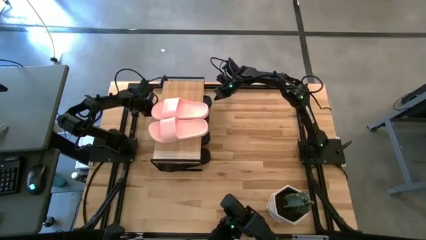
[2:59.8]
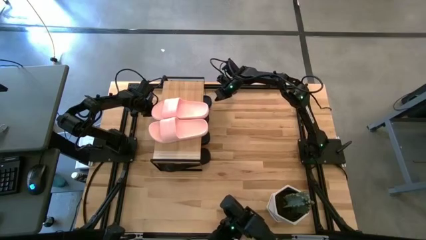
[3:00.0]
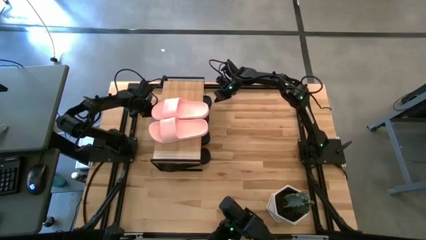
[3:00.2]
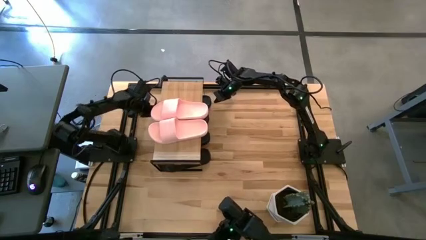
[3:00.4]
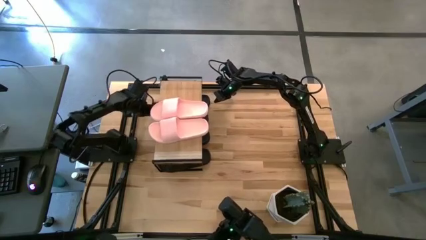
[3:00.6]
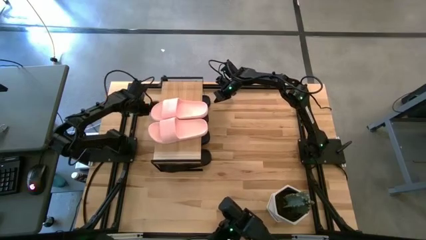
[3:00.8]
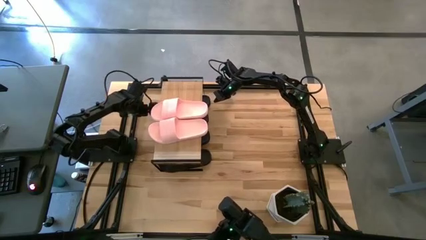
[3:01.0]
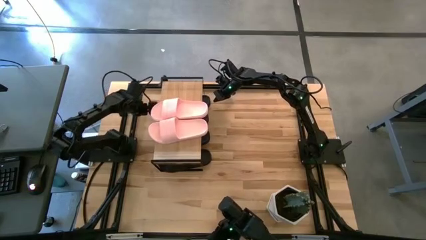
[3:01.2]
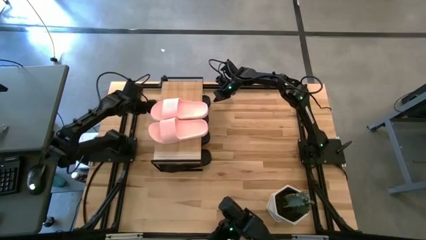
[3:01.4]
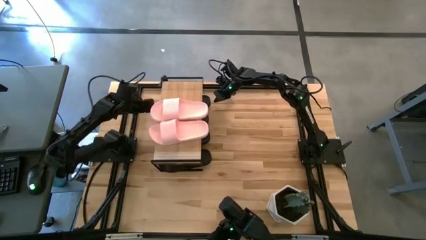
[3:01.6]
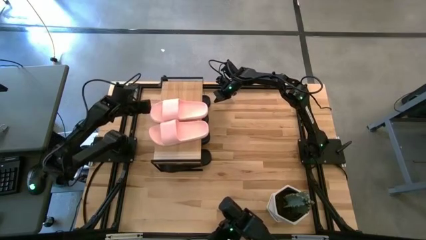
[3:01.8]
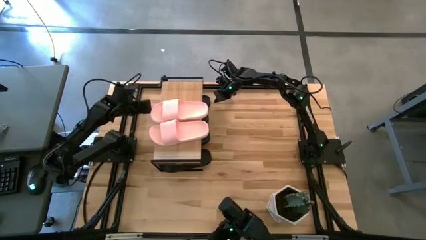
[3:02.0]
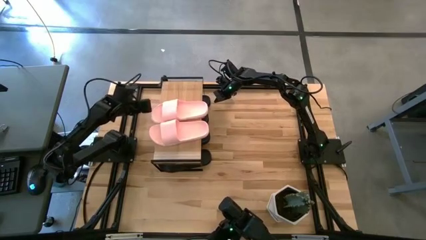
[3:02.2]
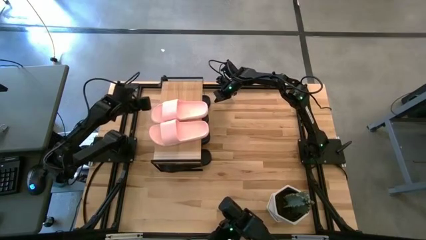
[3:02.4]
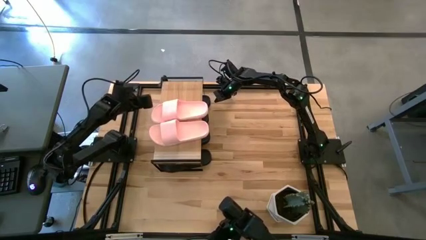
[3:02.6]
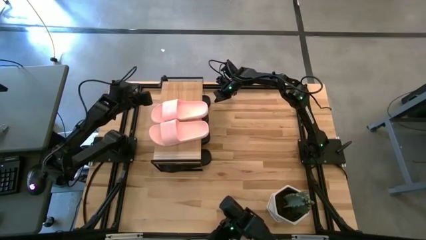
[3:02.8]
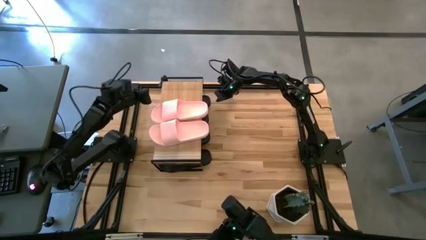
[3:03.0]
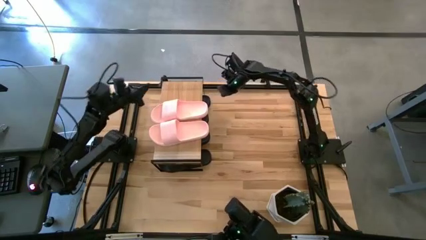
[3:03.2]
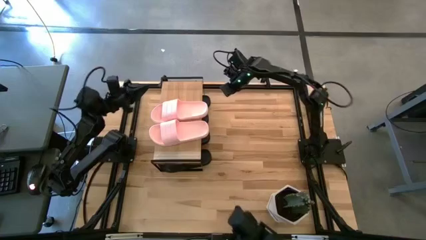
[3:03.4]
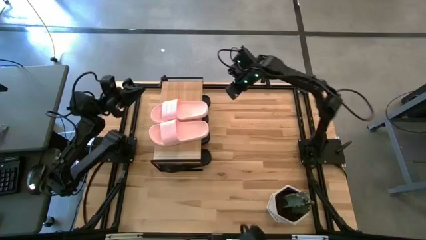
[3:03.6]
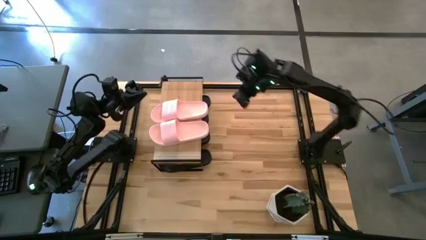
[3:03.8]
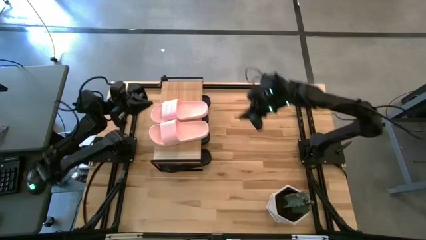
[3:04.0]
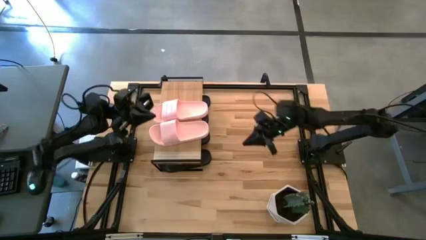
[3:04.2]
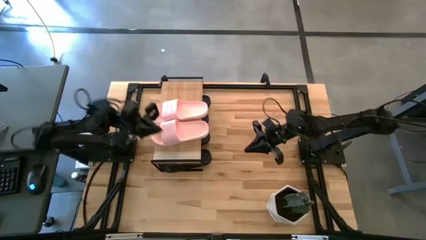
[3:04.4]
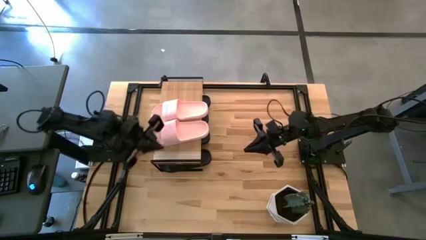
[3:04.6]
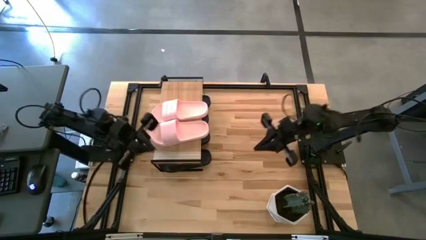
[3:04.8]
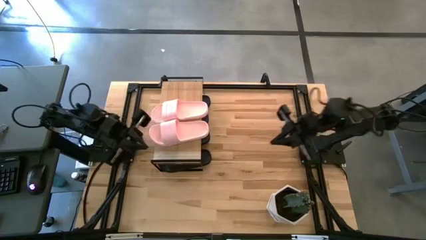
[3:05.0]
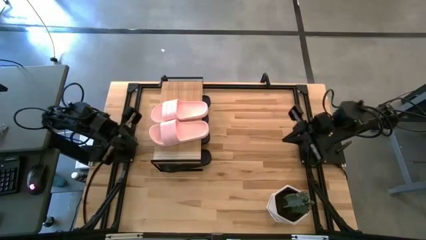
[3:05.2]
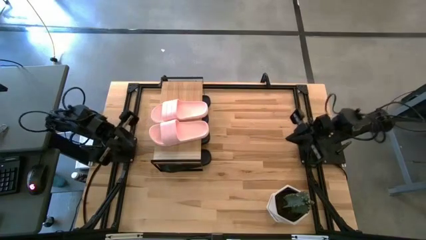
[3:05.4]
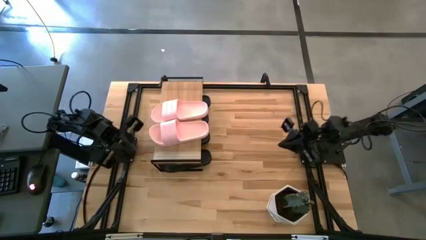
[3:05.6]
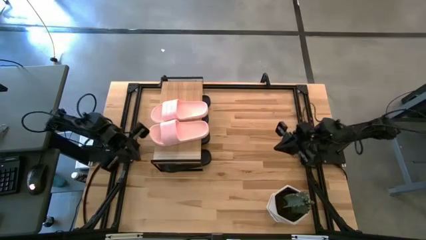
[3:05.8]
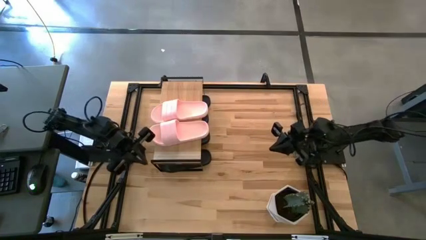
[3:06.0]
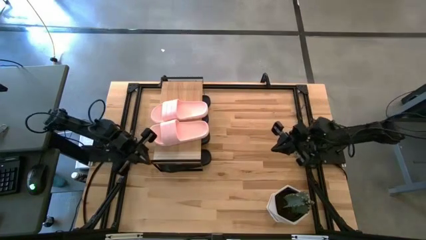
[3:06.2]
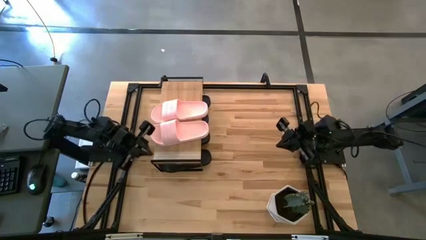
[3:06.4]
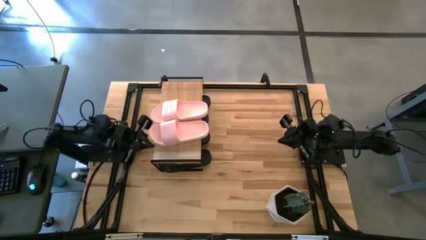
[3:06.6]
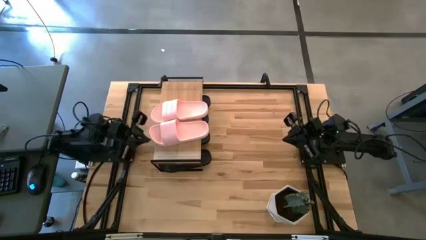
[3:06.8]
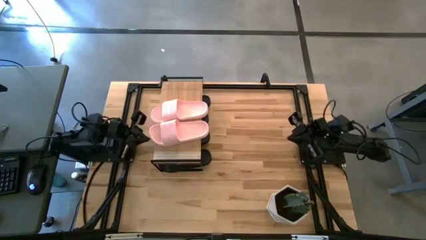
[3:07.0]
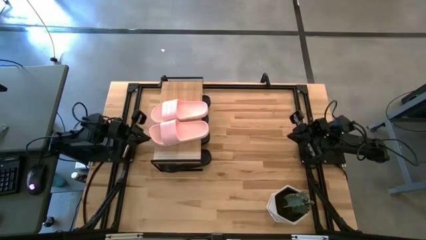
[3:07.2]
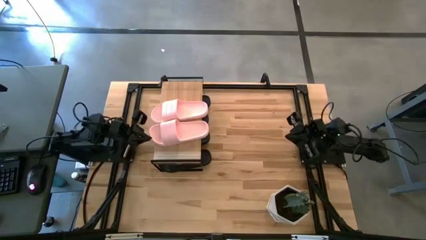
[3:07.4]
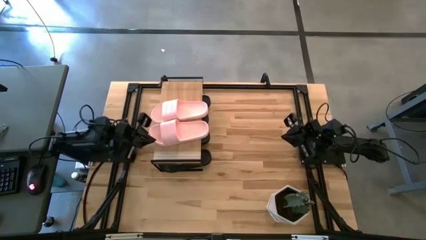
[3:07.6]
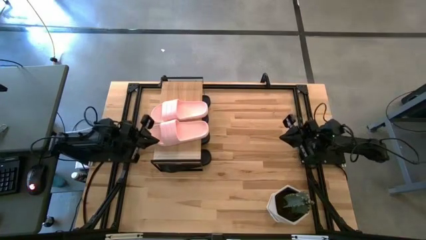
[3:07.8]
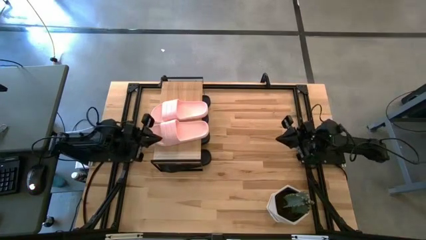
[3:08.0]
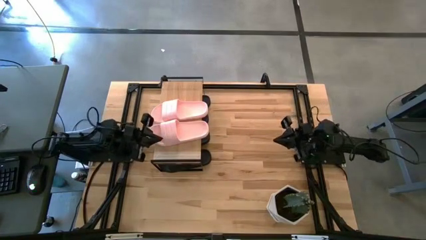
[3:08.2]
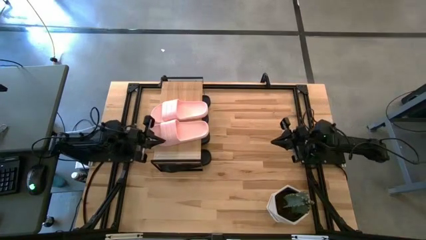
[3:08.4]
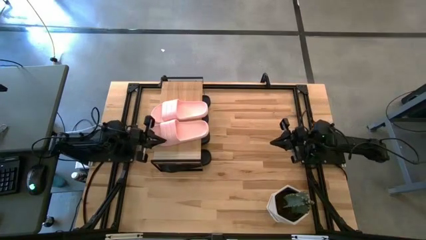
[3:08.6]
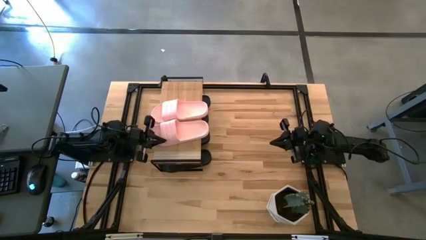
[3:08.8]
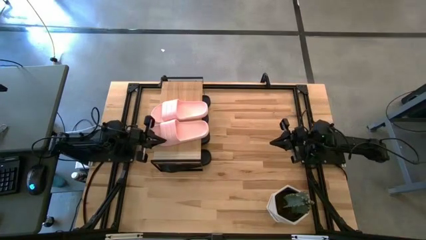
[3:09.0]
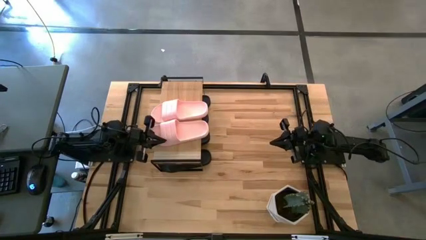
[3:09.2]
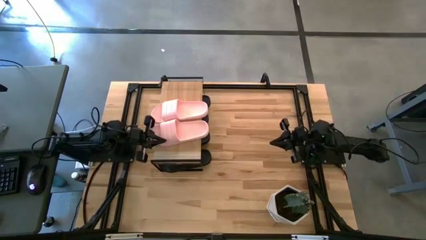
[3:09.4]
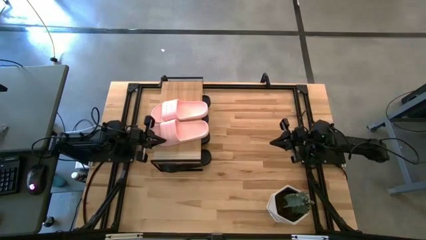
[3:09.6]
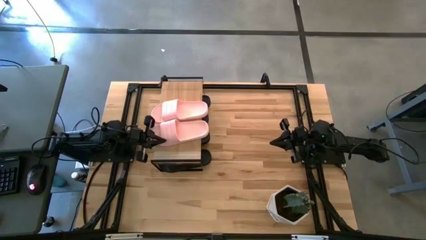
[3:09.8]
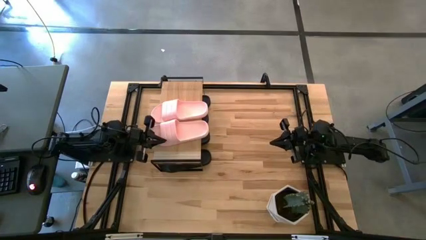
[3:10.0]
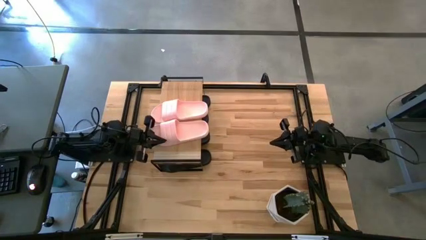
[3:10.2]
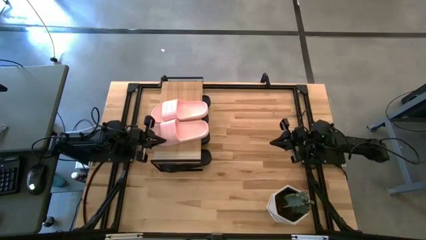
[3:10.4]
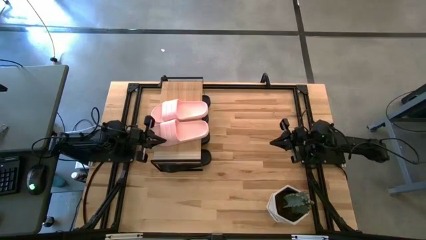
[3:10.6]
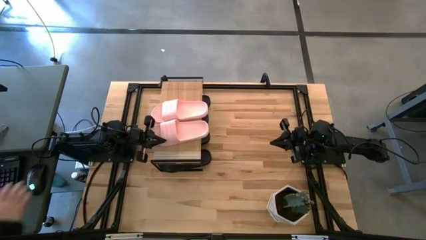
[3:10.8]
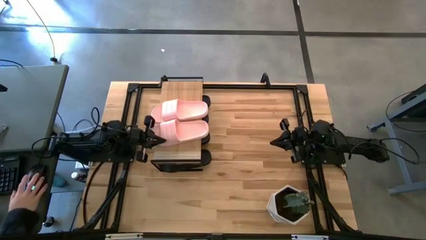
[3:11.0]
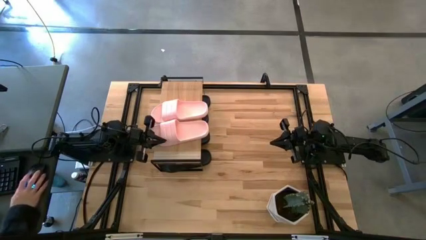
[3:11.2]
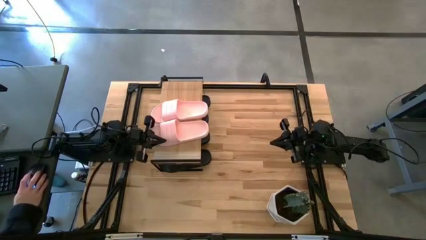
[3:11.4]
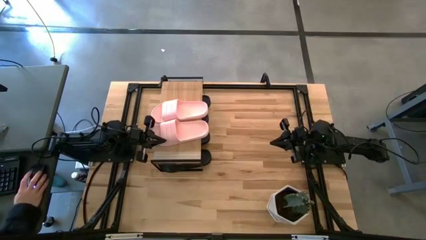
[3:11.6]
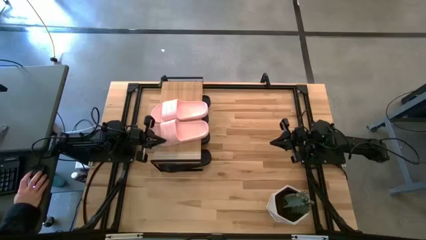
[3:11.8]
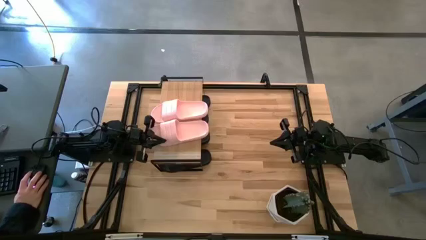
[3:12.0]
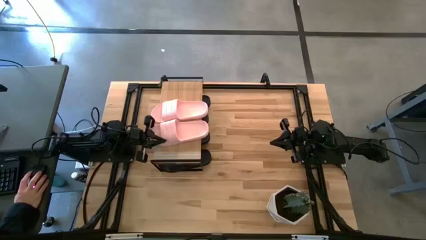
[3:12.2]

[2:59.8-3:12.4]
Task: Pick and place slides into the shelf
Return to Home Position
